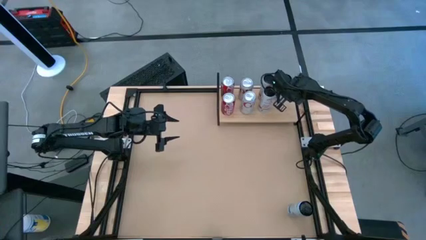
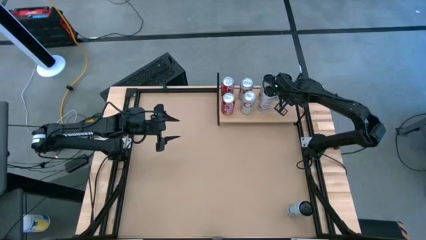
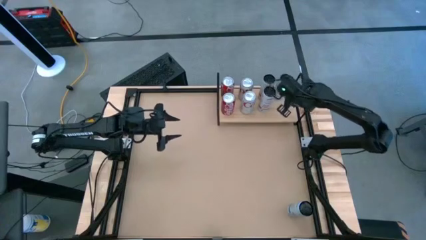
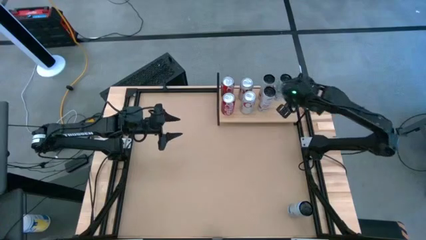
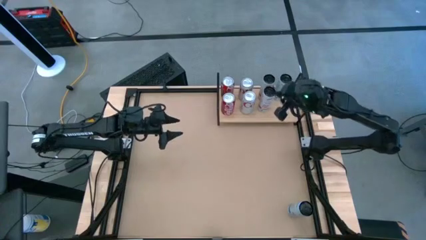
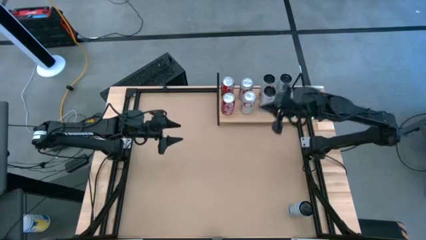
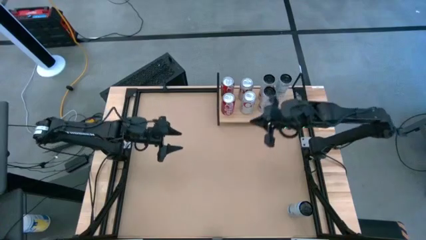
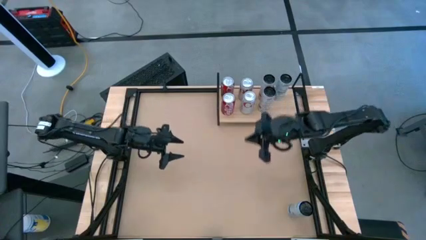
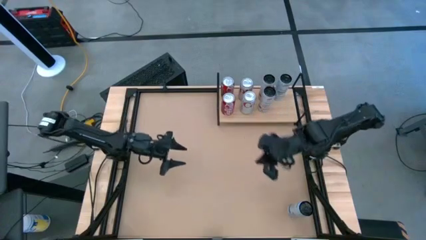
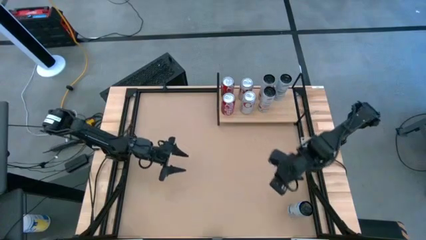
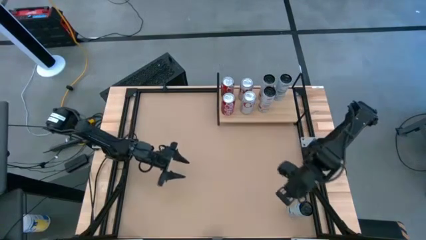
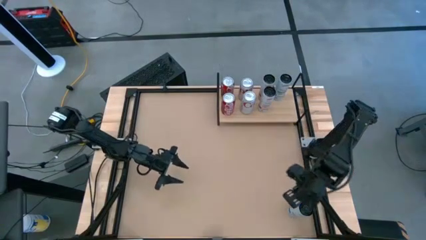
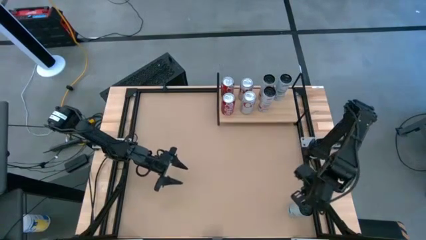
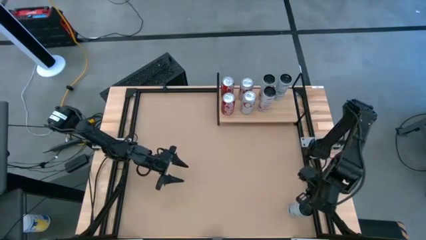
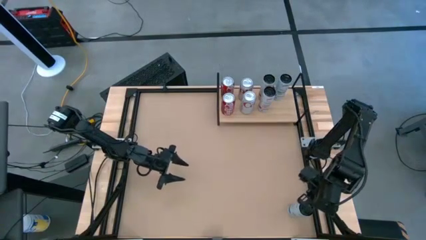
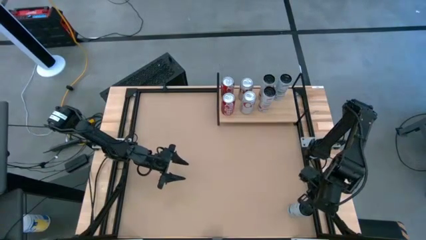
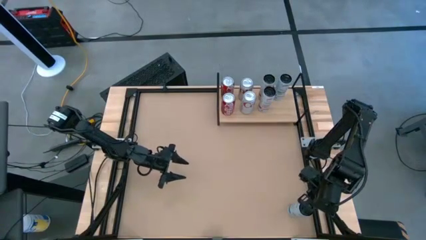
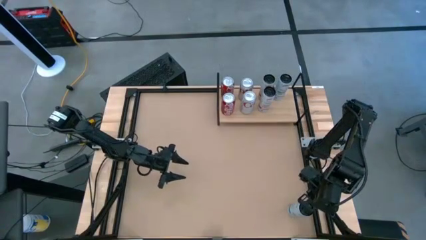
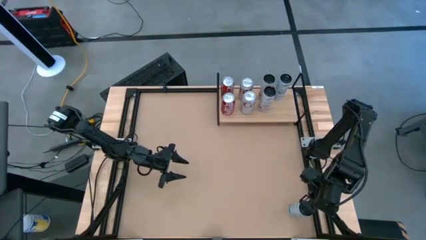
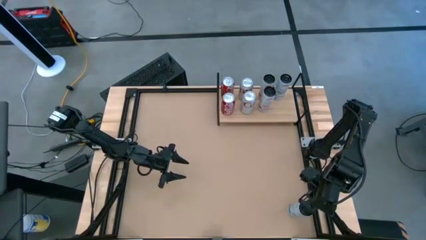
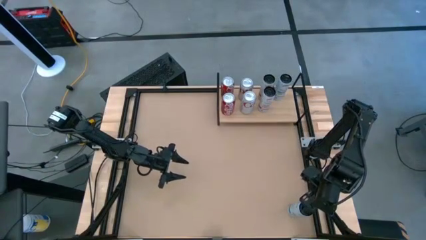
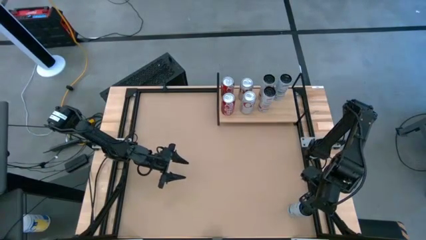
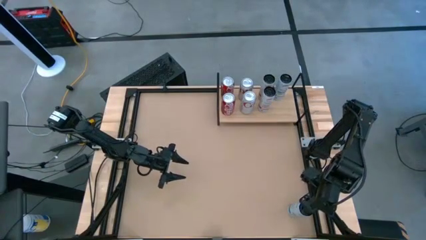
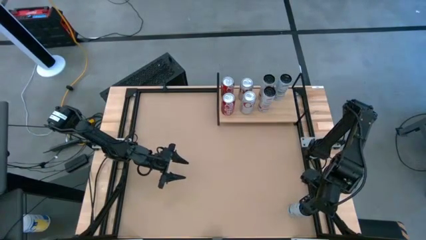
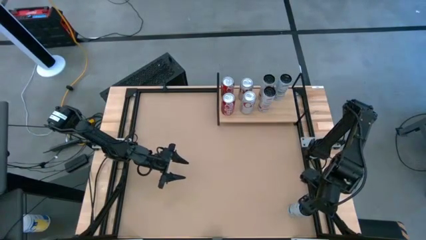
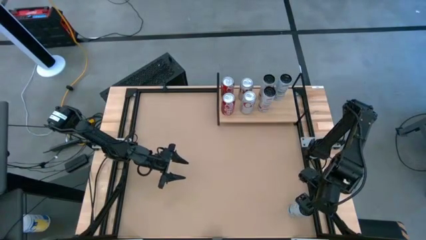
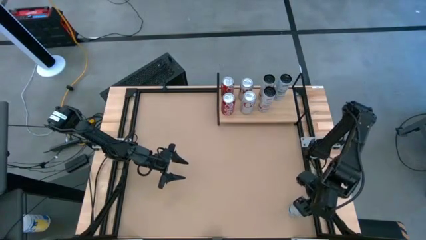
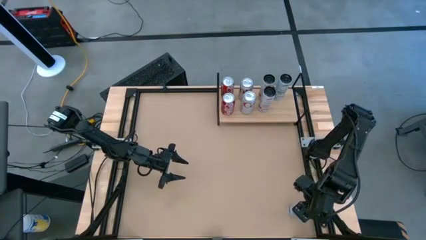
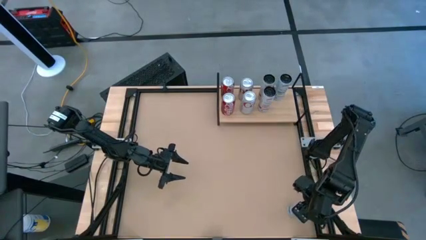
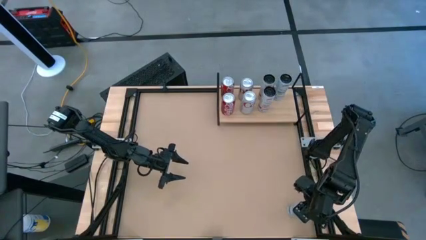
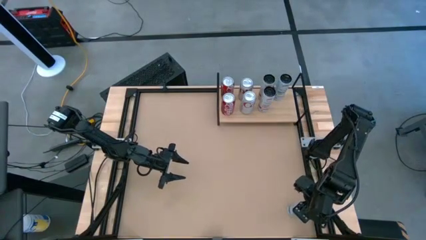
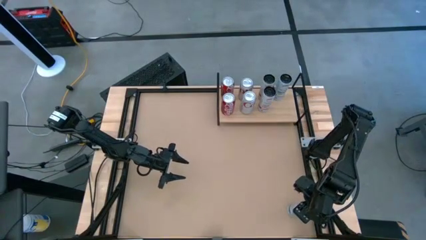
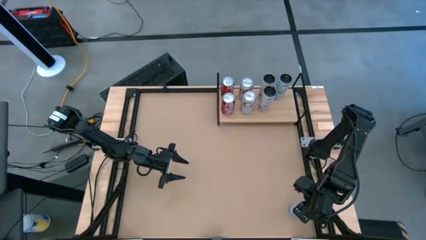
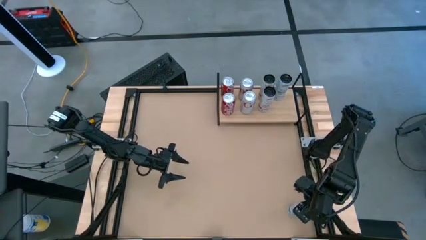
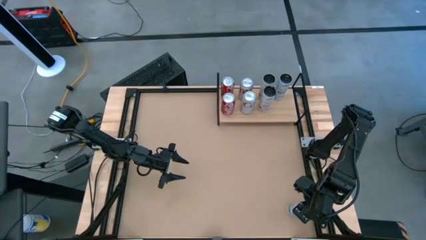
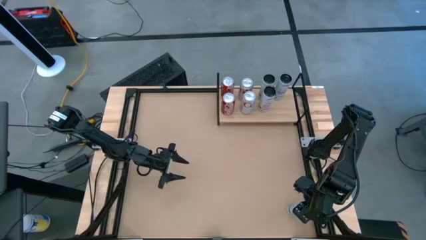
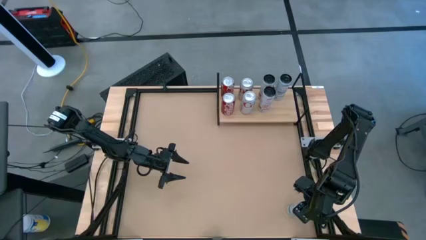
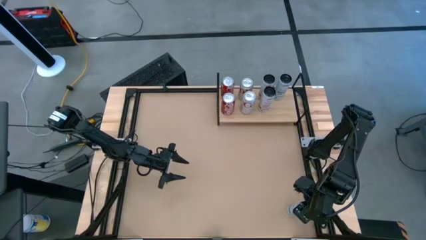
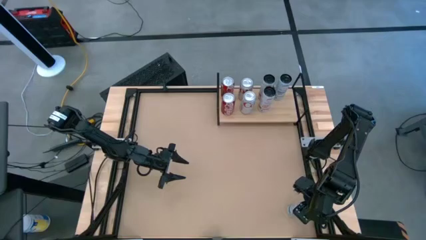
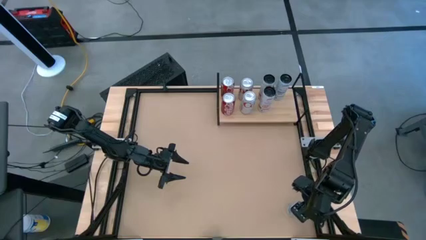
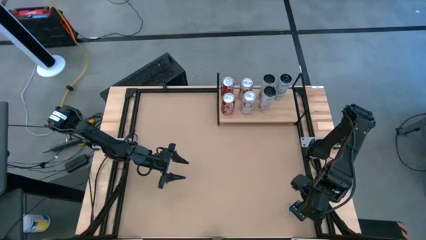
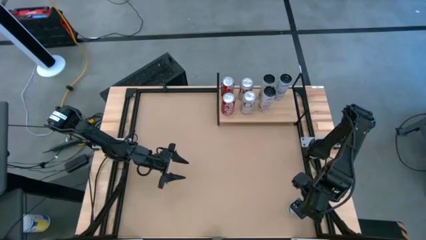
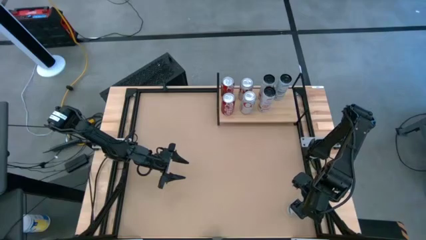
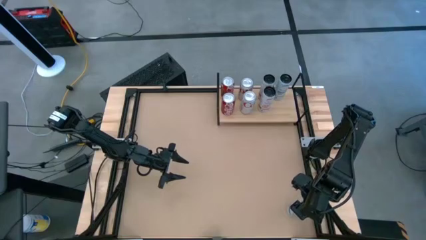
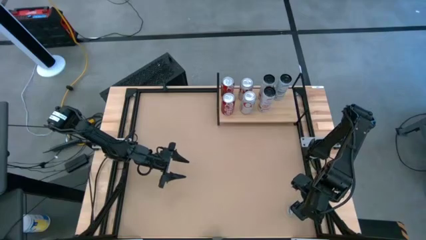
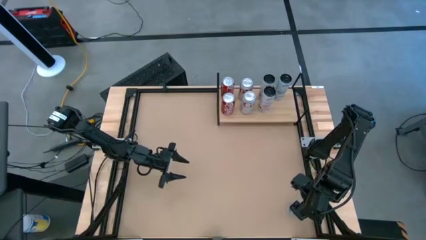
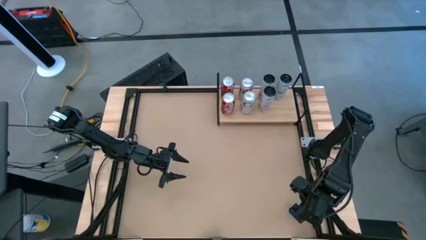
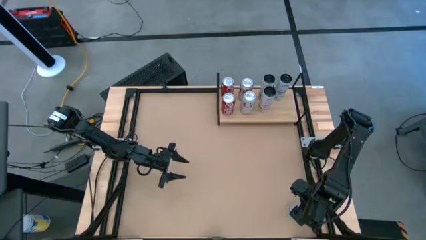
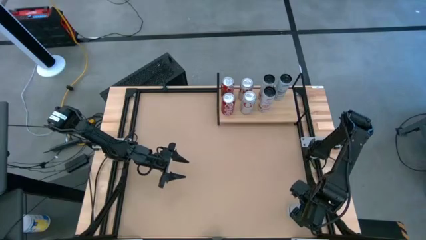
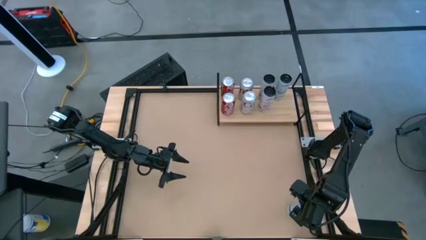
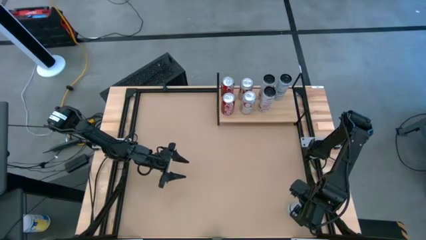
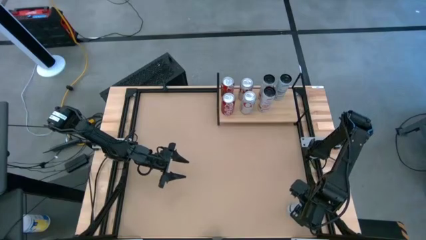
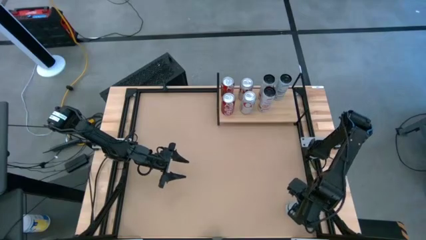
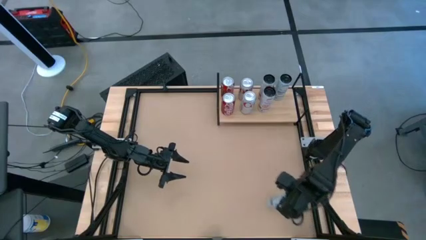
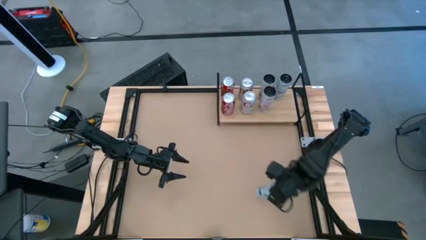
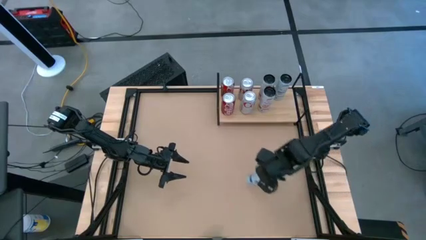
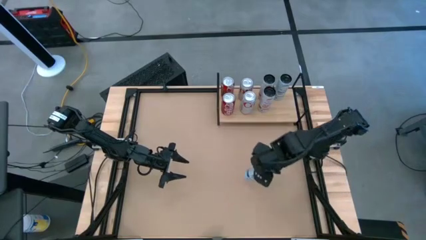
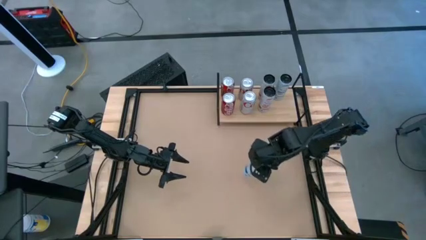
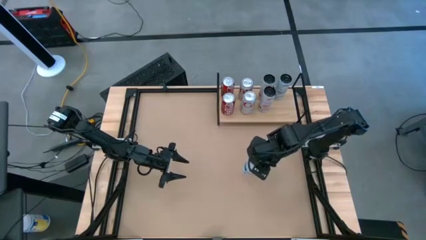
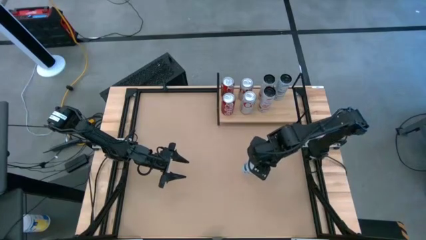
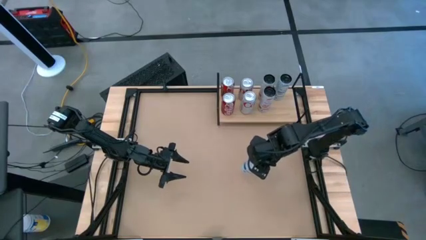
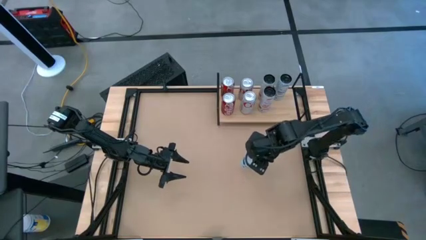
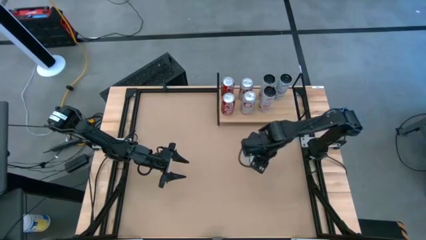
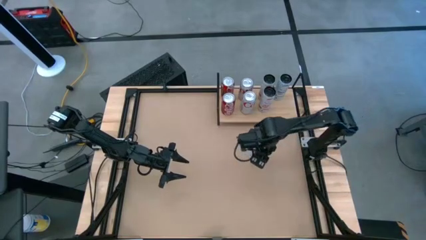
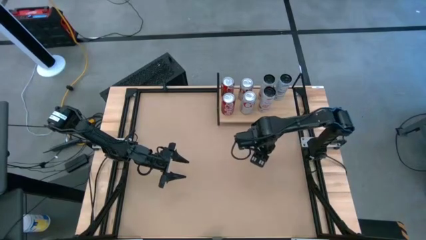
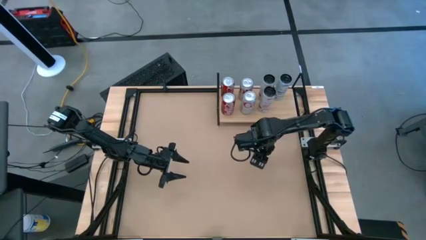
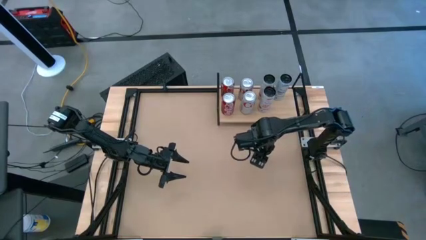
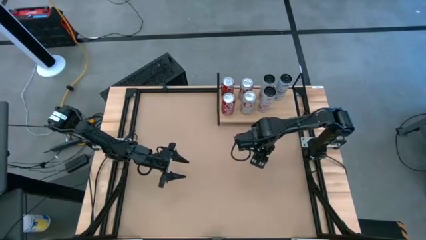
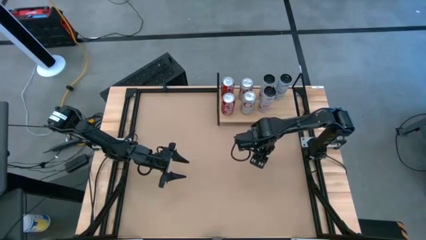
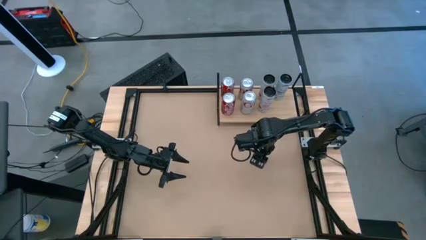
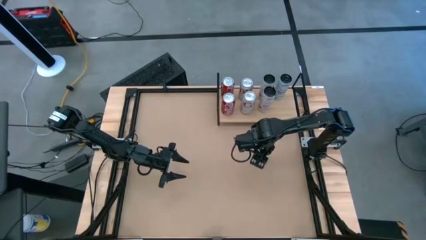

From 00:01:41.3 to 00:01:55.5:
Task: Place canned beverage on shelf
Put the blue white soda can on the shelf aligned with the other blue white soda can
